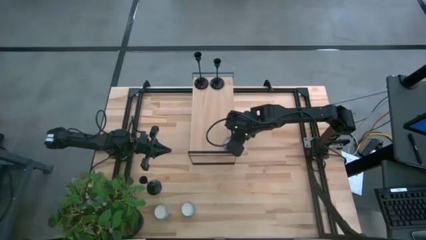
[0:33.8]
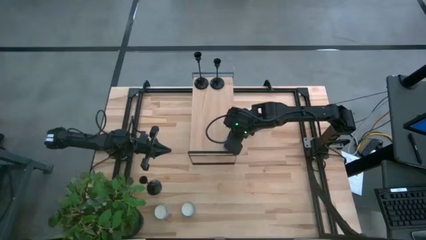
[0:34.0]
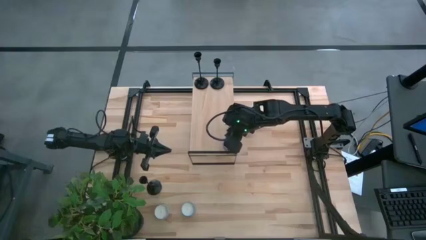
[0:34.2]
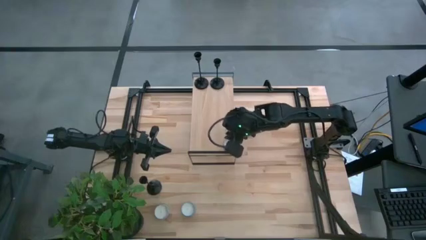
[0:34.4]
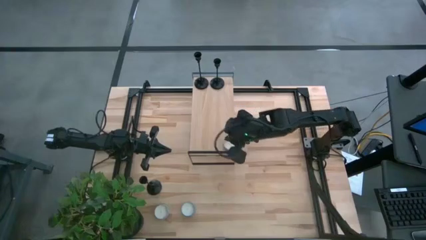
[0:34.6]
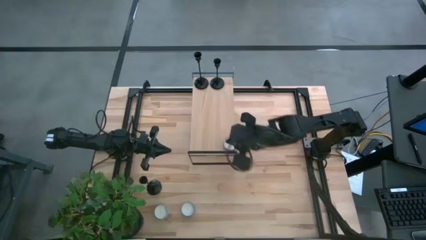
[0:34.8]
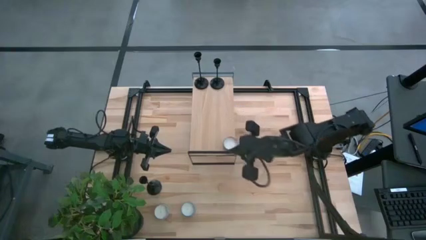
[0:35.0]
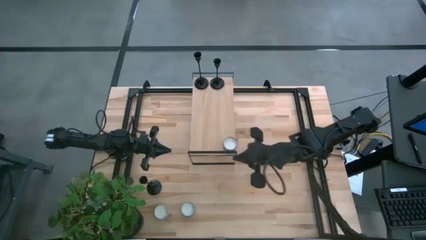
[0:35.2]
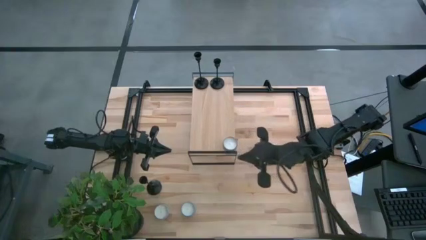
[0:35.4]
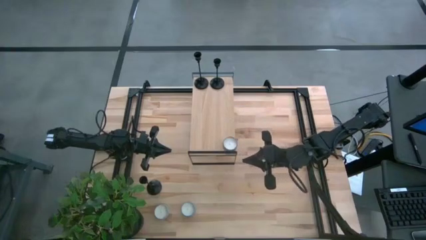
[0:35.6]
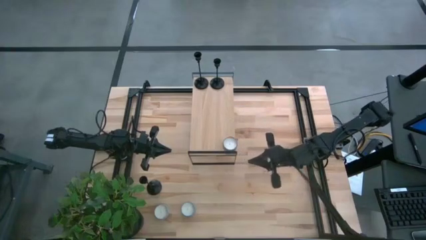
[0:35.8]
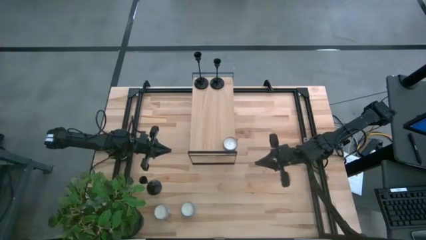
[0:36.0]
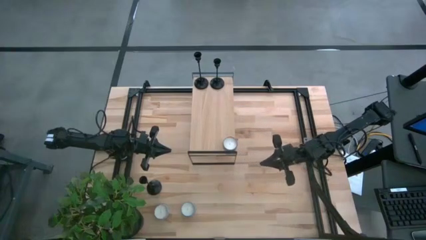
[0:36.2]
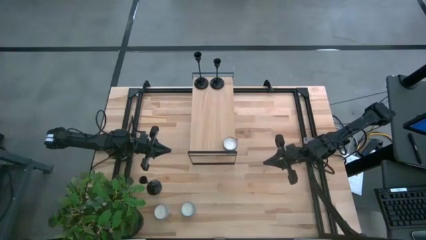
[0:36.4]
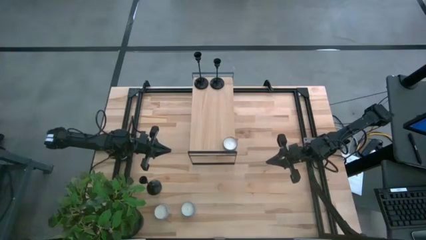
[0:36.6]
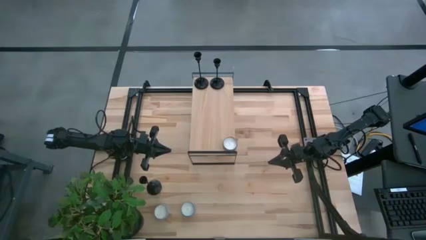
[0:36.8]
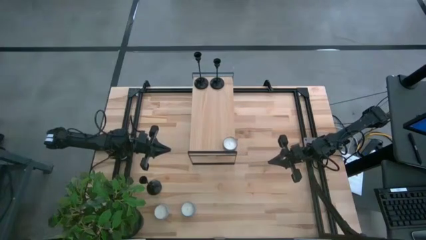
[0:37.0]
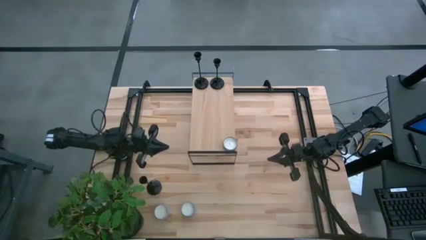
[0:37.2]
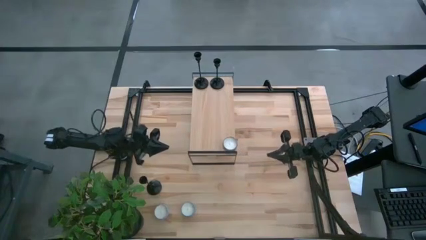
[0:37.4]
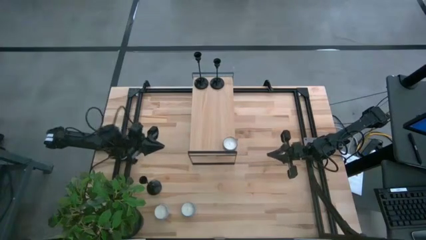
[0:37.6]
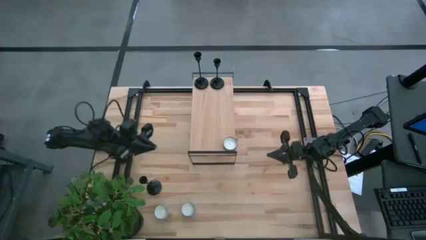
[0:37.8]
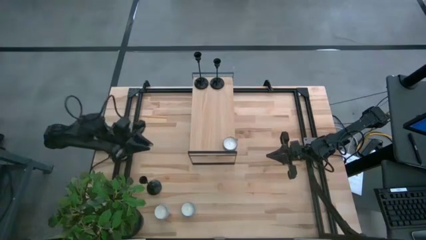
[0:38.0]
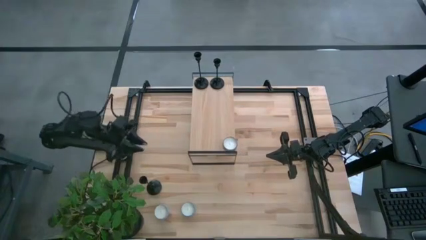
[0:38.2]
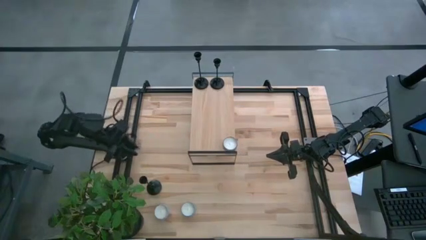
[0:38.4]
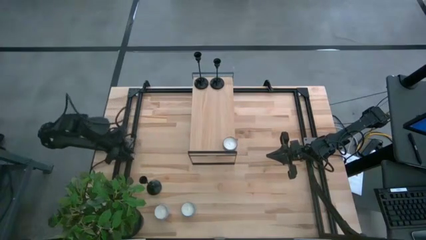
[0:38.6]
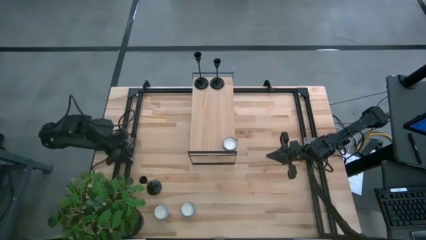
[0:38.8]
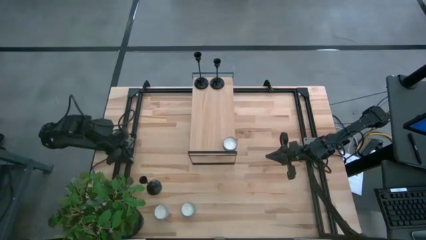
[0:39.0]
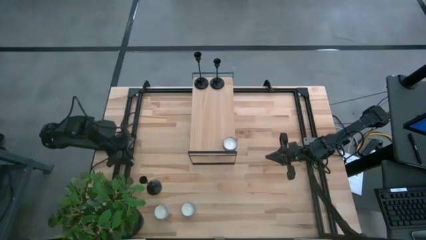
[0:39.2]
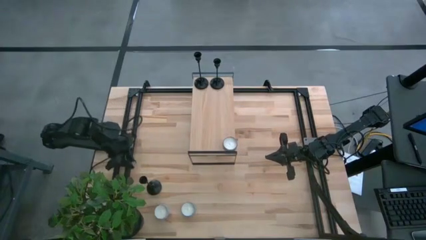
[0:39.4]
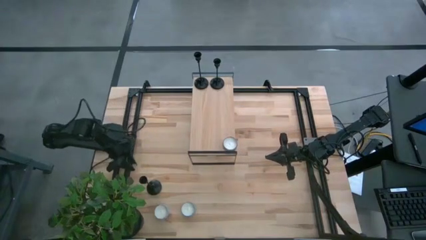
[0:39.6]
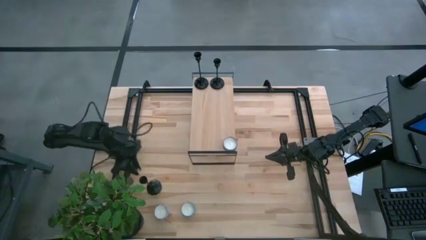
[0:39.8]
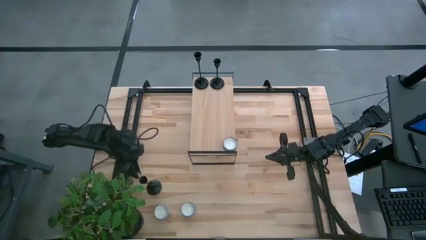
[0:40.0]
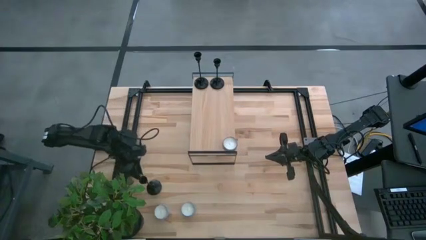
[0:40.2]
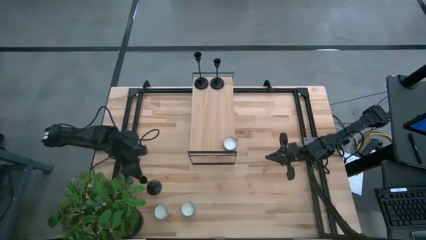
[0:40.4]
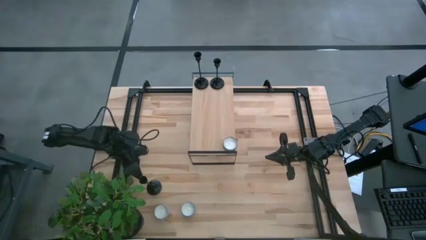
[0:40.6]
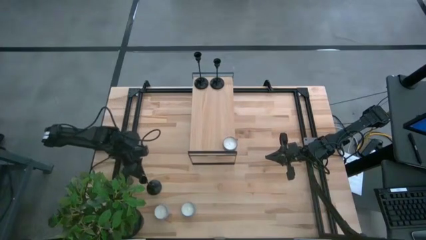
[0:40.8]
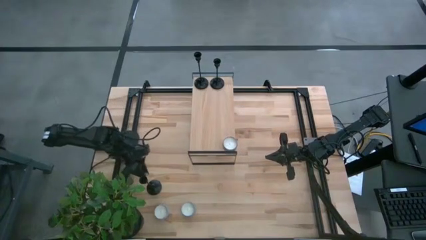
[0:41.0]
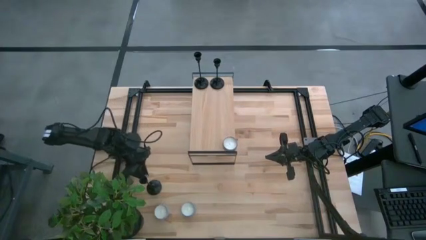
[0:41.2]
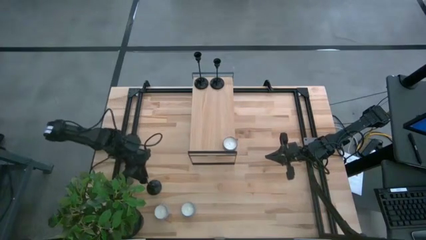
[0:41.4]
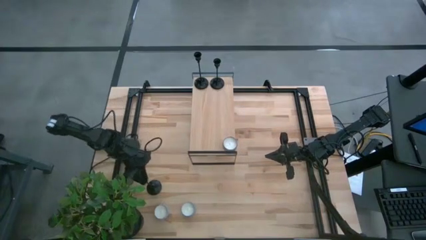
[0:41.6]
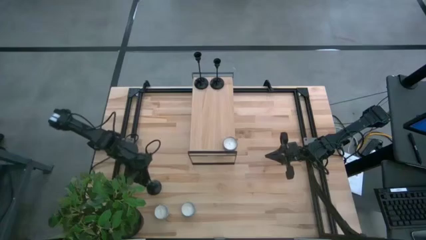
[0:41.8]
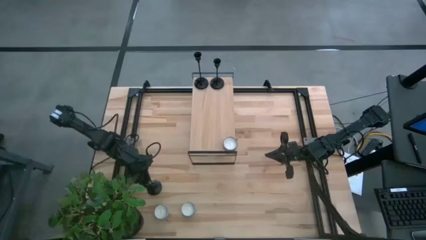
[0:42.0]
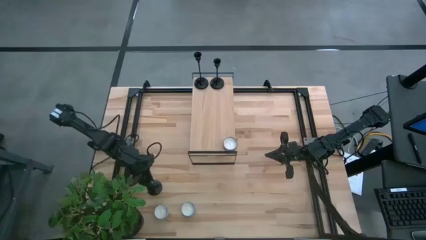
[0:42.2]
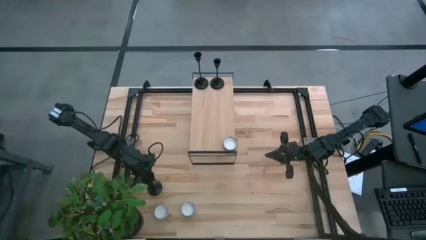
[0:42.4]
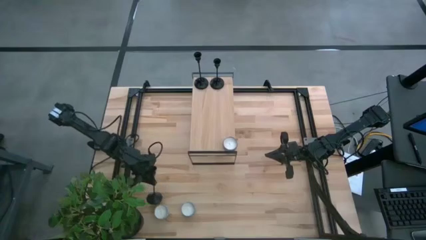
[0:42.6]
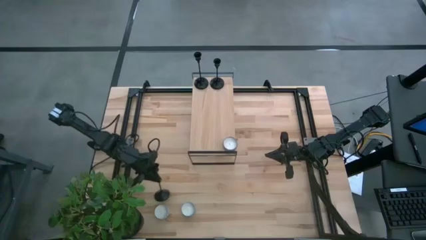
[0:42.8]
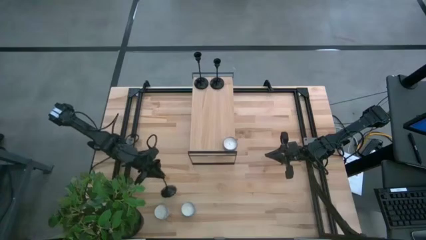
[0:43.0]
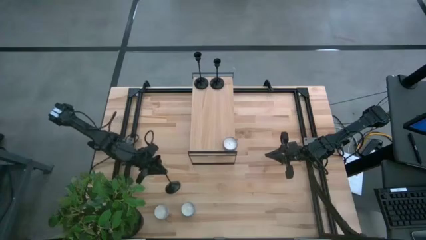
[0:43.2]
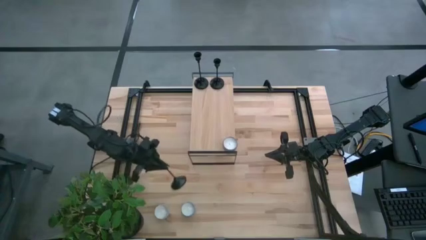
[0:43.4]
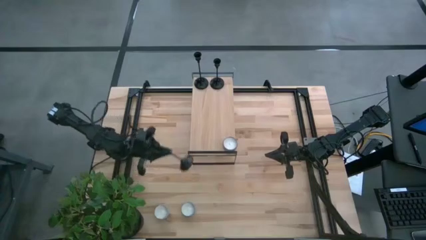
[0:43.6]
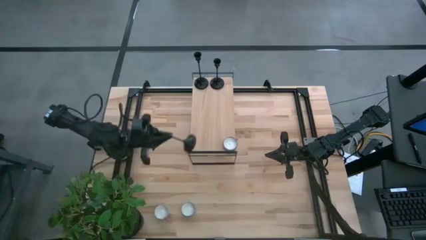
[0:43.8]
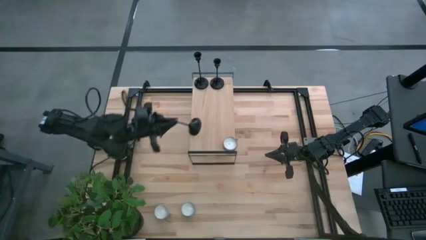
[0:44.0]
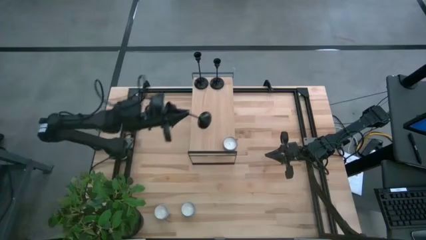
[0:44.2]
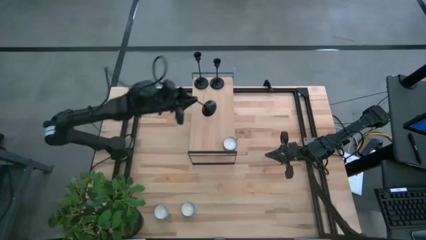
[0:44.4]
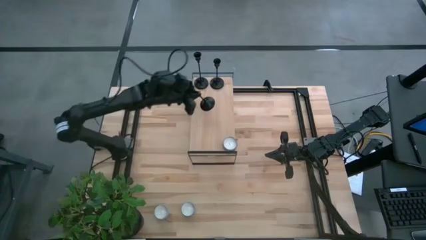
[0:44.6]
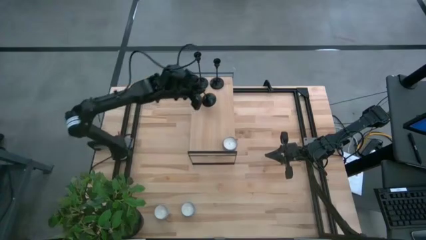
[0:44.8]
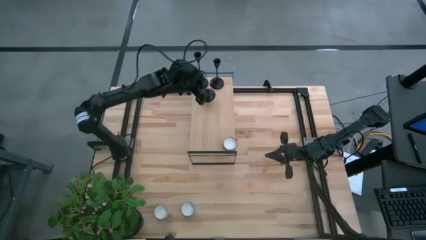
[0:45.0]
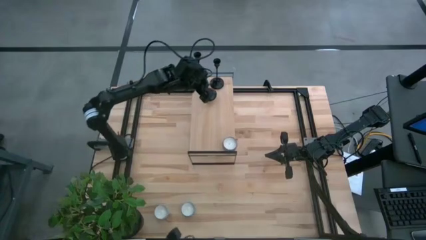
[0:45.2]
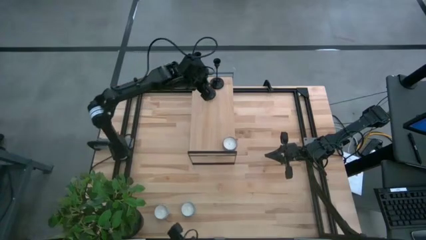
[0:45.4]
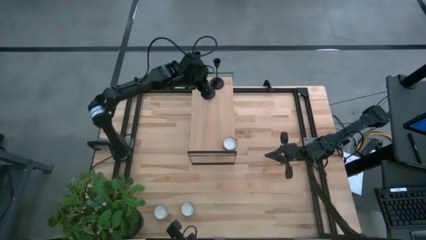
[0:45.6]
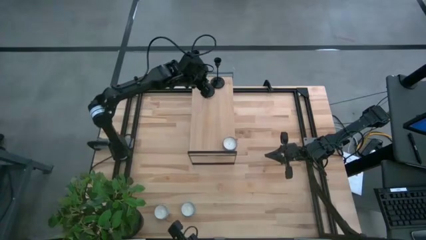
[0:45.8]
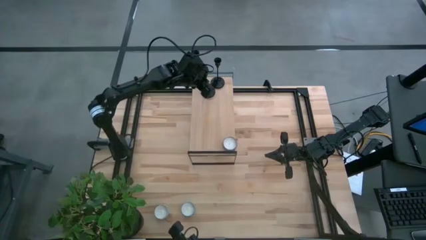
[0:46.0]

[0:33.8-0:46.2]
Task: Pick & Place candle stick holders
Put the black candle holder on the shelf

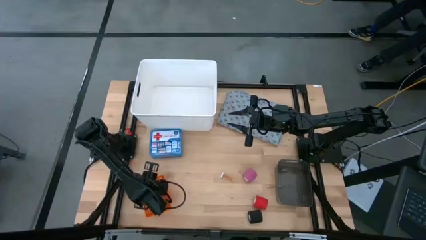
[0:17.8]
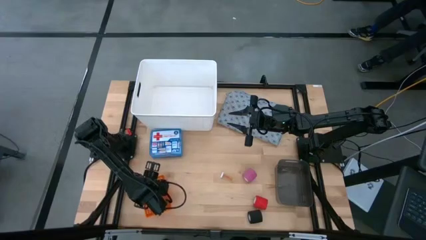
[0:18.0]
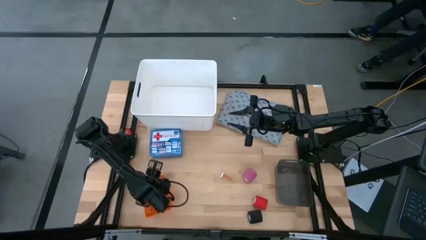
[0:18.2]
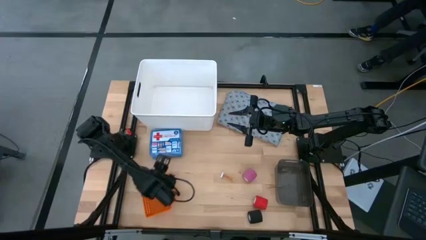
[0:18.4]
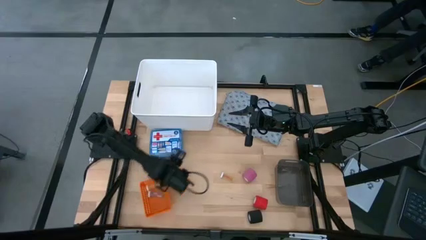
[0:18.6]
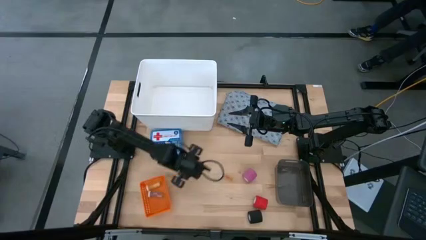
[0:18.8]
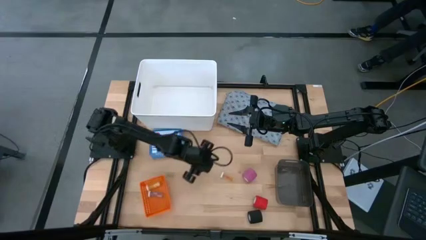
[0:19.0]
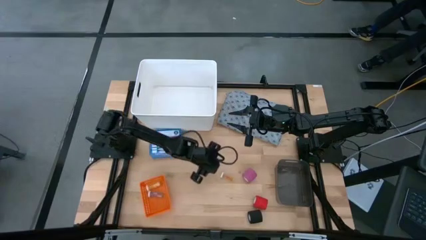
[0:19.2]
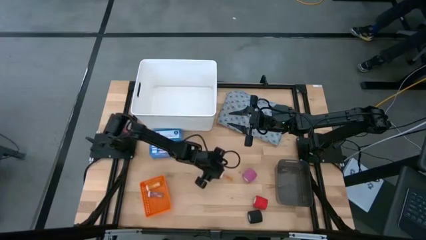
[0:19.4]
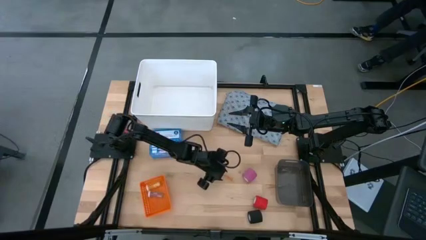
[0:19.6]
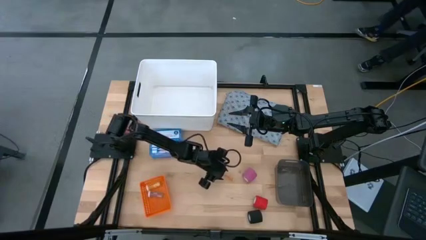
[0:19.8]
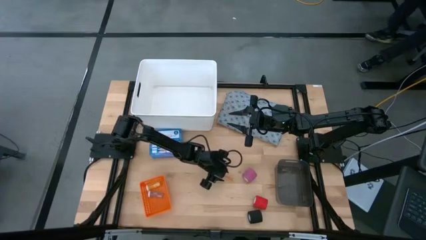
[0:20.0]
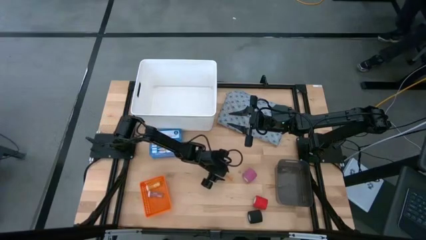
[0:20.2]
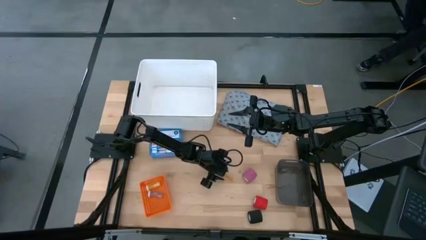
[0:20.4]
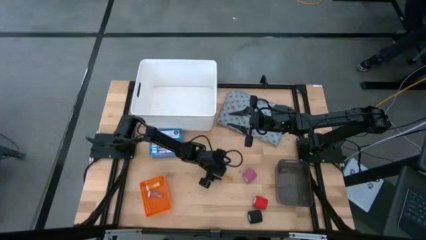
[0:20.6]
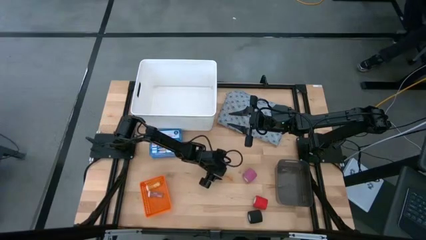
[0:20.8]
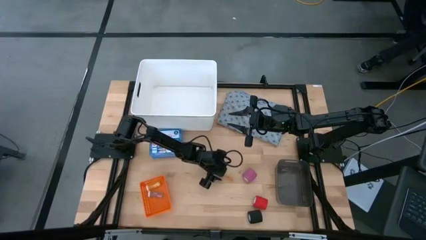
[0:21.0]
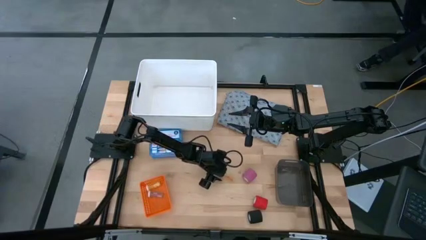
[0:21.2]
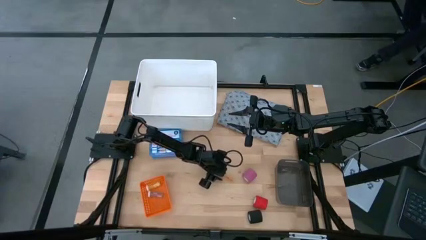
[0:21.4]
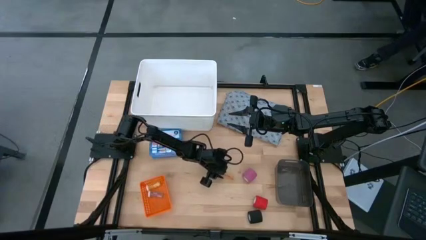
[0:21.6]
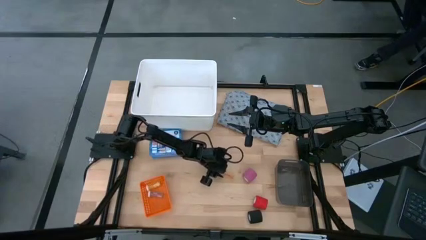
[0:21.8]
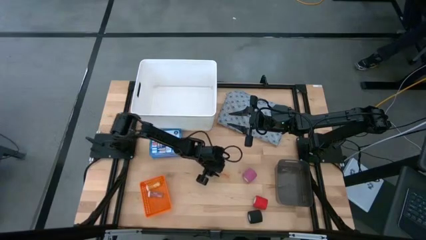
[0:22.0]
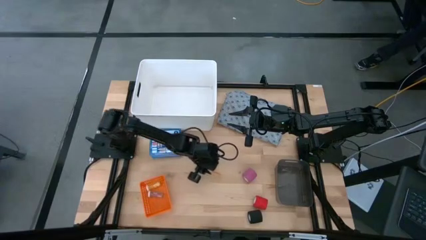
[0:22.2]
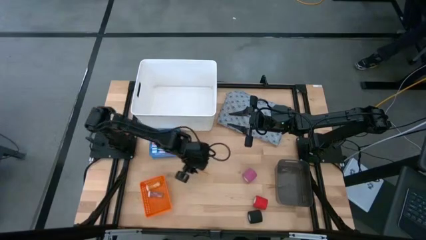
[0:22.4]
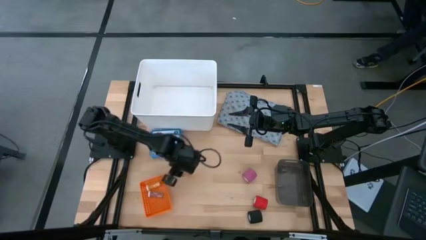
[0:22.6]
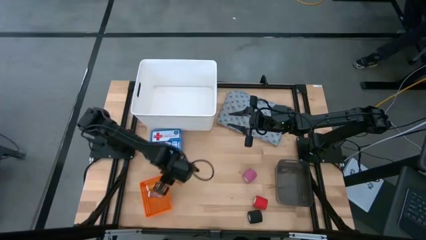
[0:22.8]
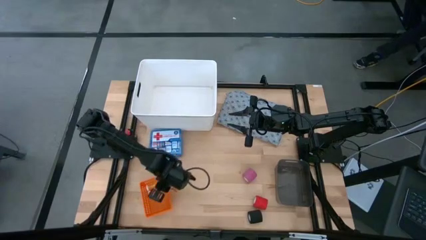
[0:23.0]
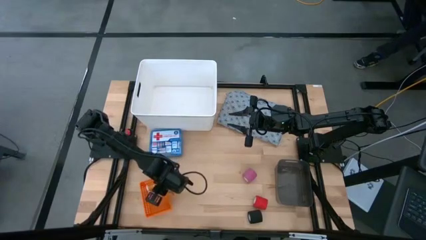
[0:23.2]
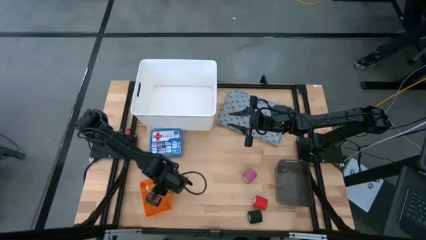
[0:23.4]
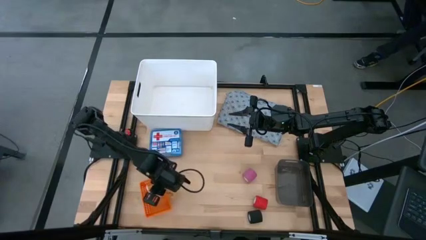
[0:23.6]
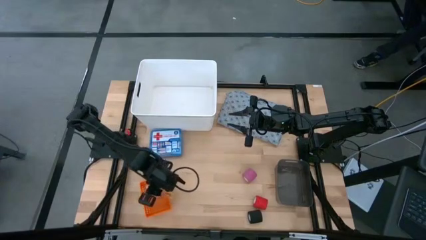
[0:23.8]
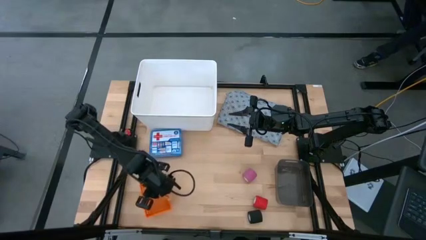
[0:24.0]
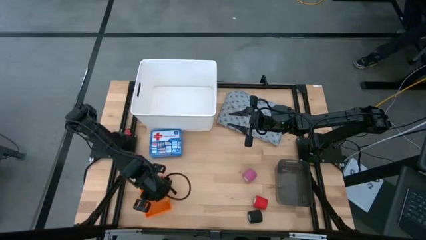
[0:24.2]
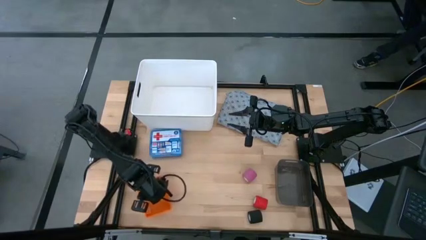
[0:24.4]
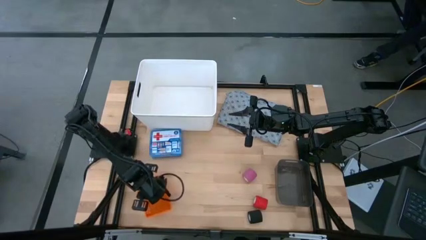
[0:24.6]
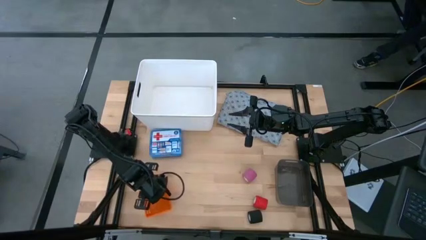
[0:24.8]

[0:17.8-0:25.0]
Task: Pick & place medical supplies in basket/bin
Put the yellow pill bottle in the orange bin
